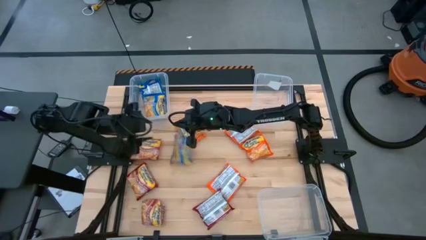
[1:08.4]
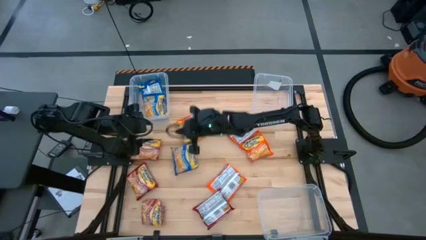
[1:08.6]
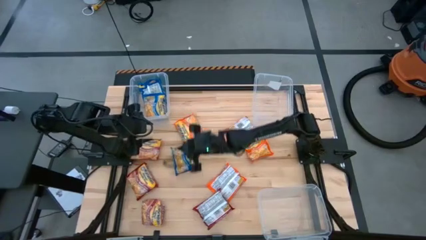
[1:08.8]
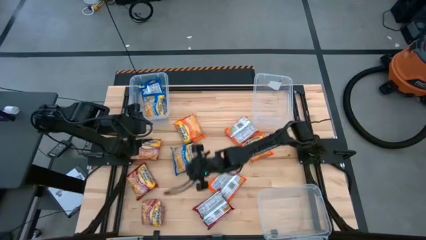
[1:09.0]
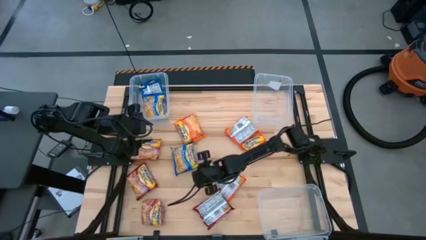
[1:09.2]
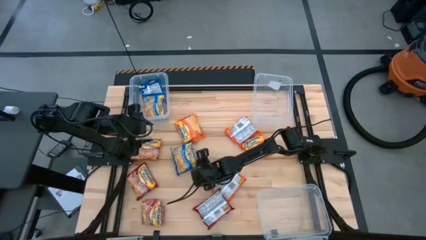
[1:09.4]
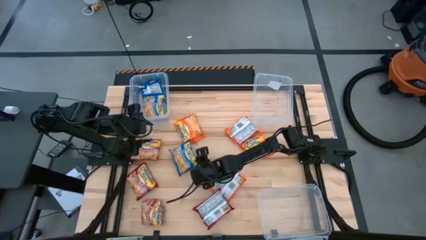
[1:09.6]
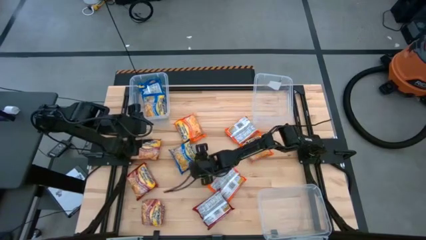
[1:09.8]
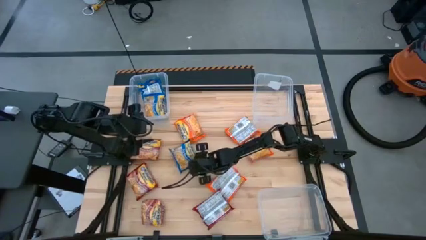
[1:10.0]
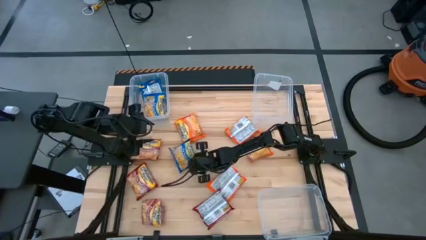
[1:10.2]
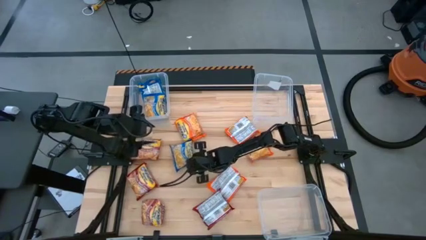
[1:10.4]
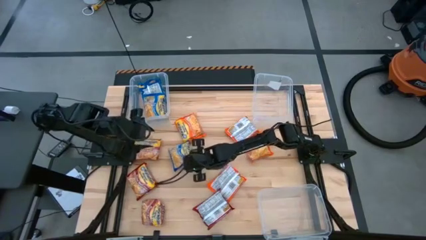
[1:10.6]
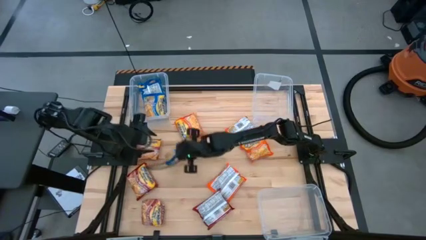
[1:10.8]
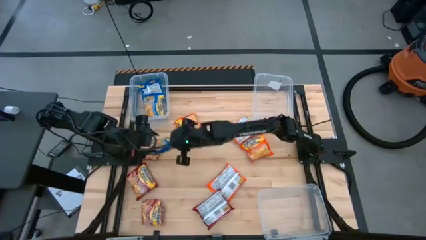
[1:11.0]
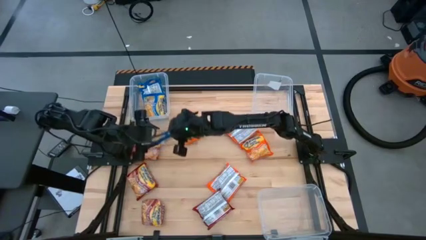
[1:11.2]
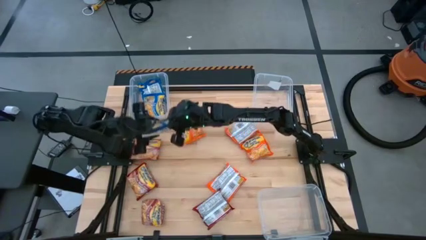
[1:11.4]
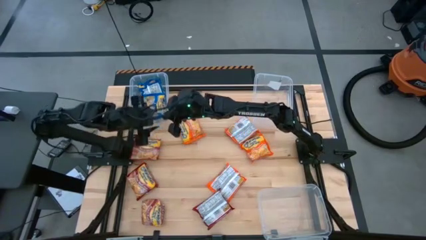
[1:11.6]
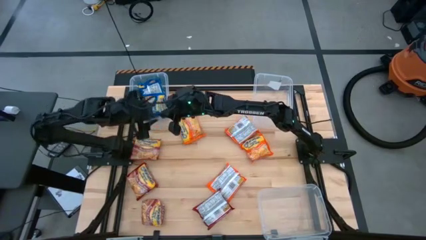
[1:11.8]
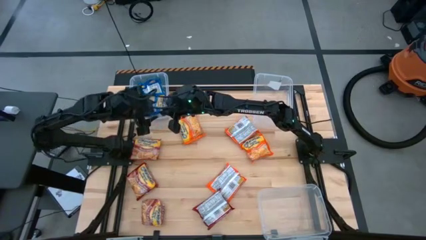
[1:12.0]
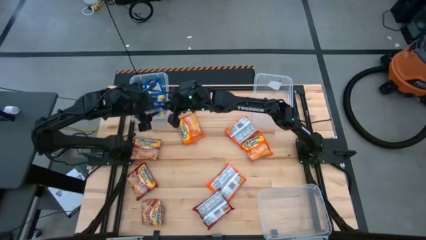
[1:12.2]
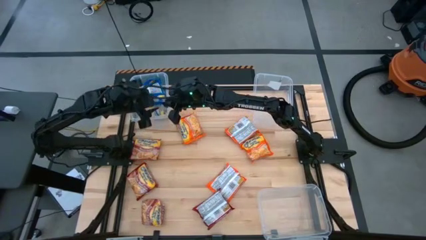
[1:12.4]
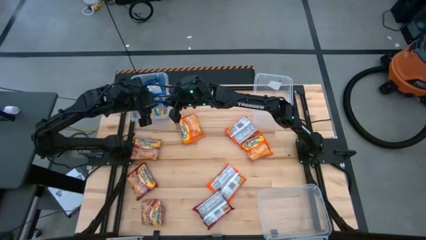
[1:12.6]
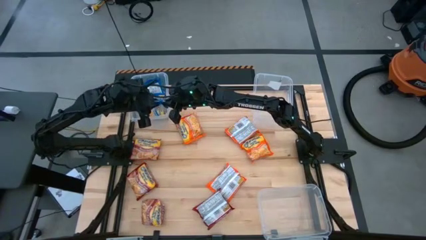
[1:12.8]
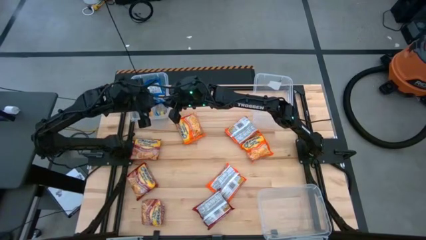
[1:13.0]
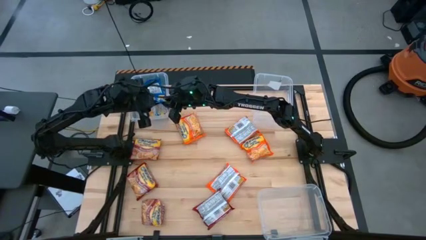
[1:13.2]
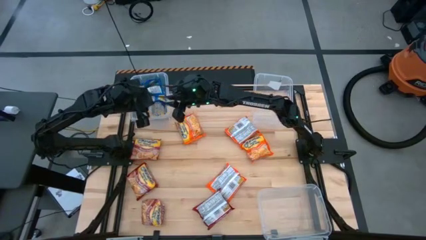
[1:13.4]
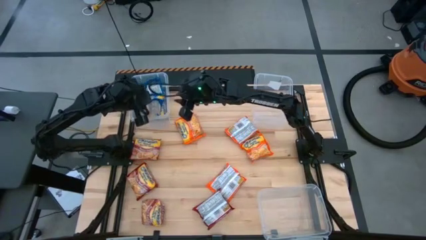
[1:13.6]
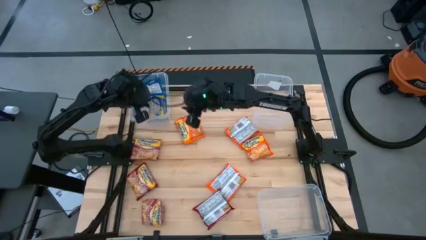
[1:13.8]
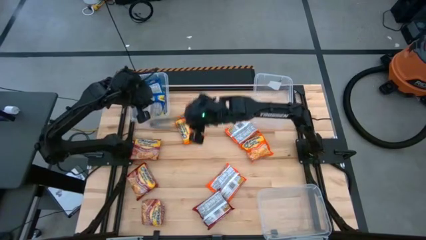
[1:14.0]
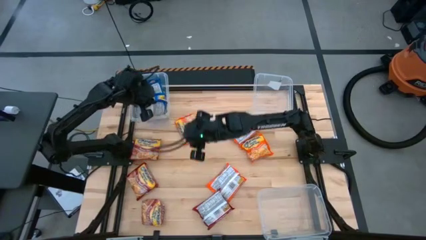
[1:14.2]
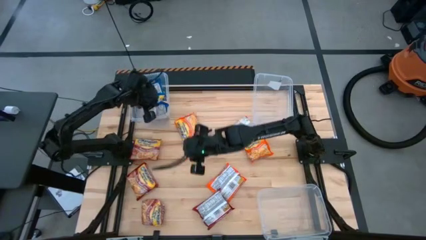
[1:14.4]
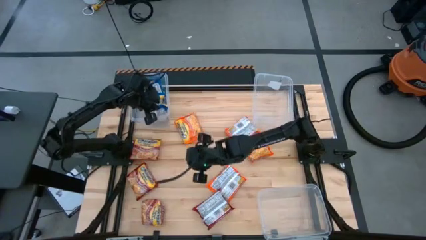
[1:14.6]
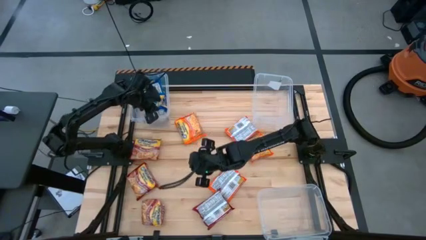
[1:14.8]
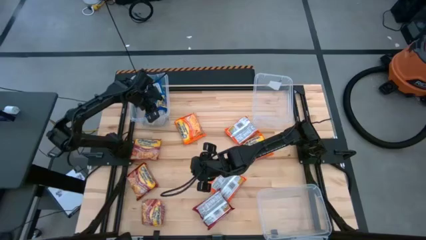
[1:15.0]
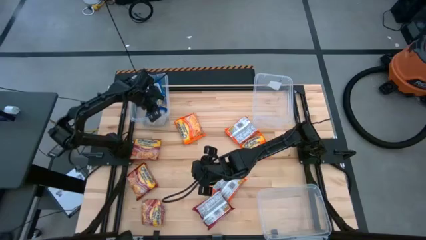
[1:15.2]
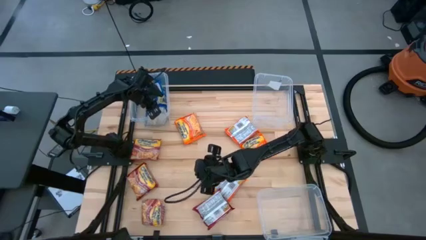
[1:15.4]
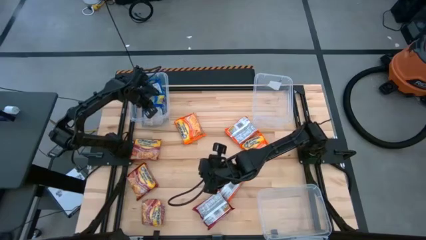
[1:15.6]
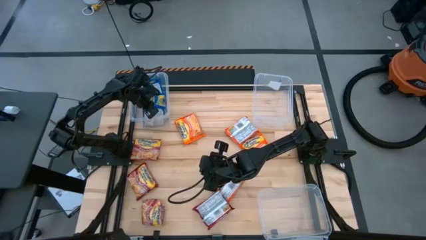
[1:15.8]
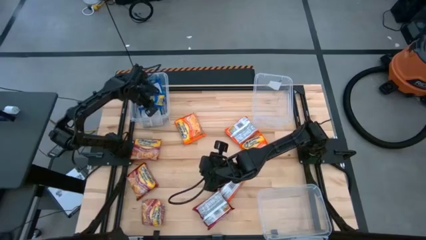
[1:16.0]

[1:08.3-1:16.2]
Task: Sort Maruchan noodles
Put the blue noodle pack into the top left transparent bin

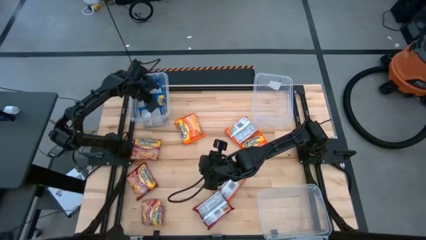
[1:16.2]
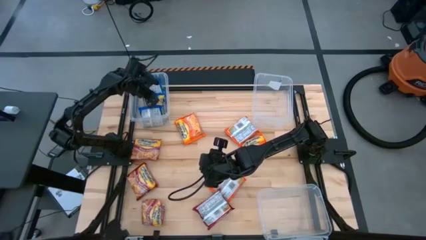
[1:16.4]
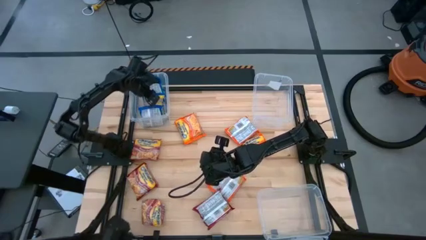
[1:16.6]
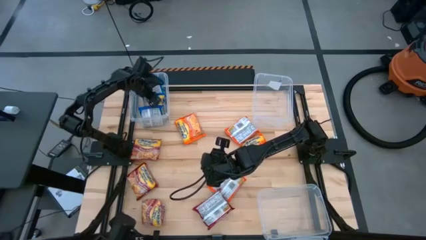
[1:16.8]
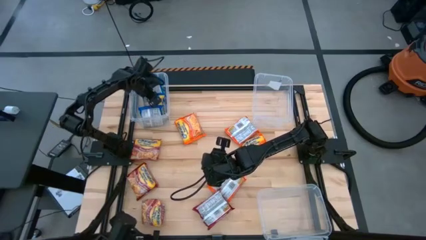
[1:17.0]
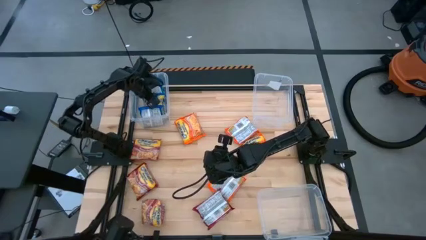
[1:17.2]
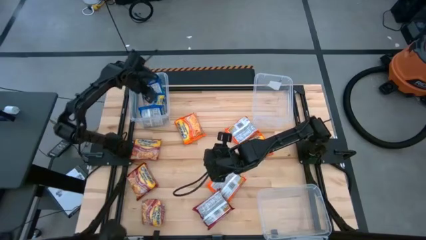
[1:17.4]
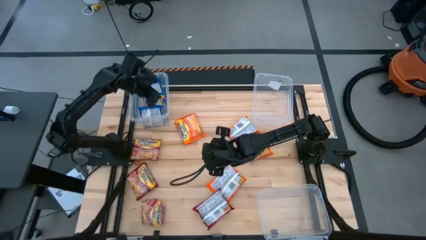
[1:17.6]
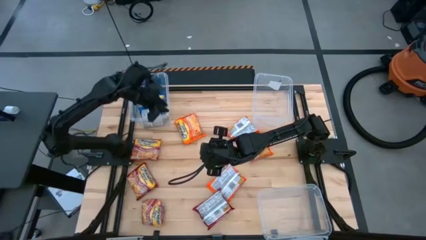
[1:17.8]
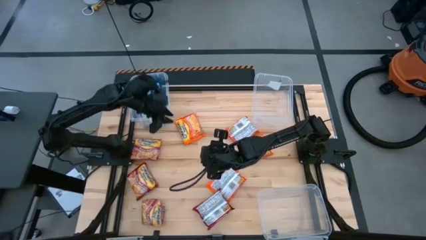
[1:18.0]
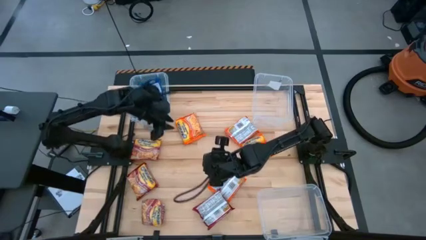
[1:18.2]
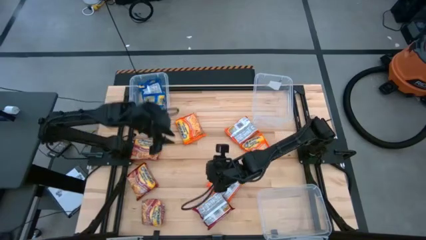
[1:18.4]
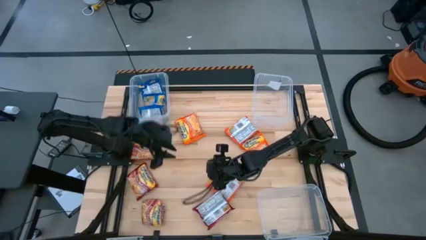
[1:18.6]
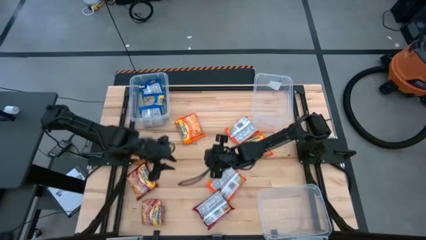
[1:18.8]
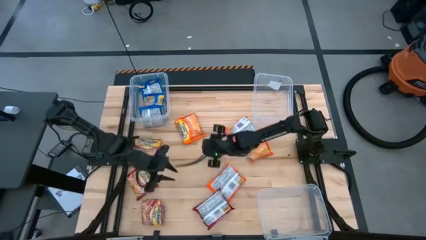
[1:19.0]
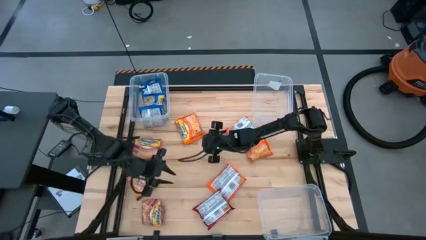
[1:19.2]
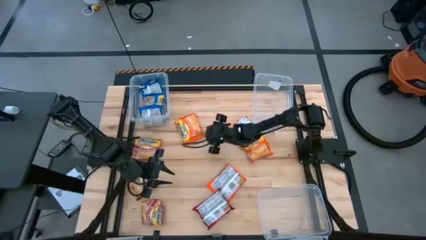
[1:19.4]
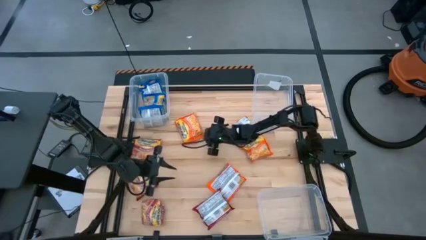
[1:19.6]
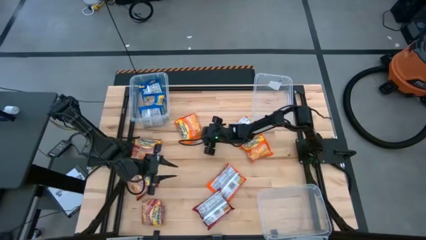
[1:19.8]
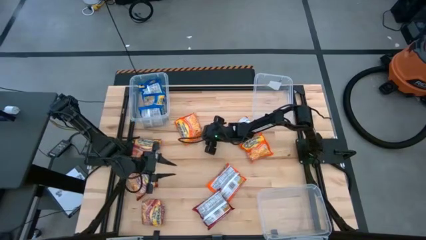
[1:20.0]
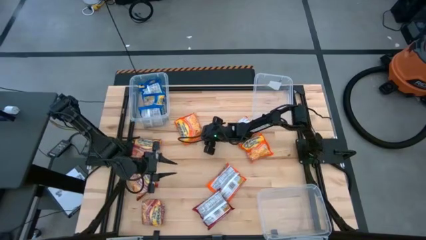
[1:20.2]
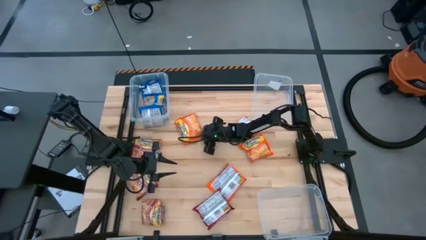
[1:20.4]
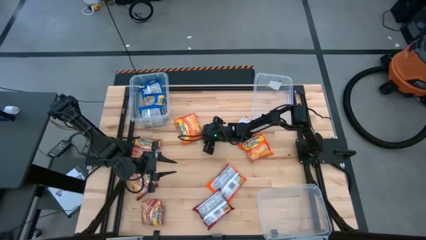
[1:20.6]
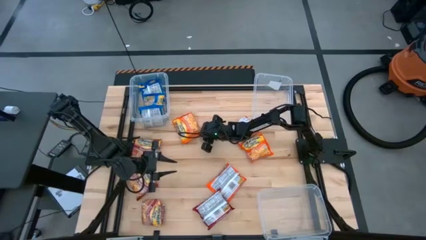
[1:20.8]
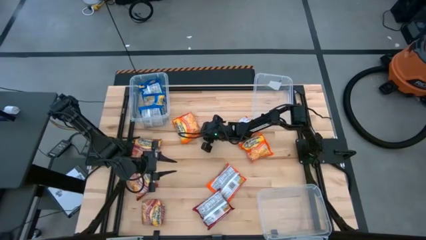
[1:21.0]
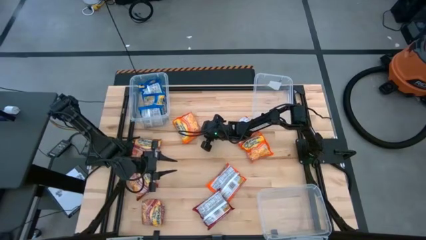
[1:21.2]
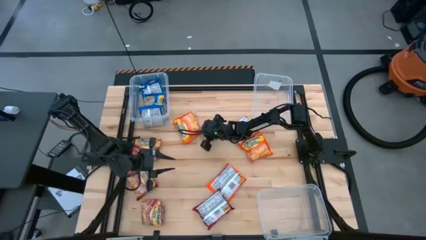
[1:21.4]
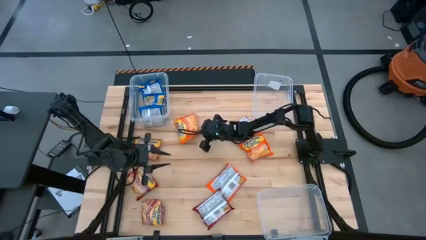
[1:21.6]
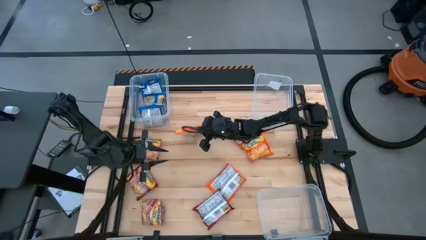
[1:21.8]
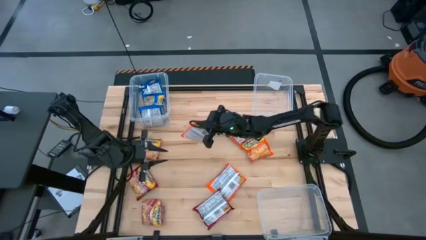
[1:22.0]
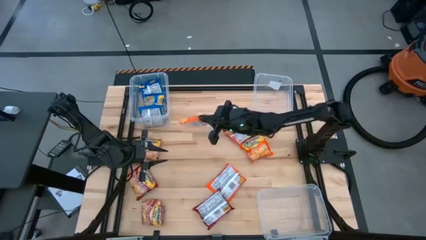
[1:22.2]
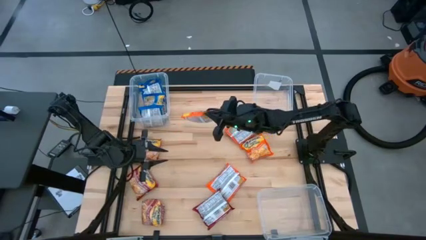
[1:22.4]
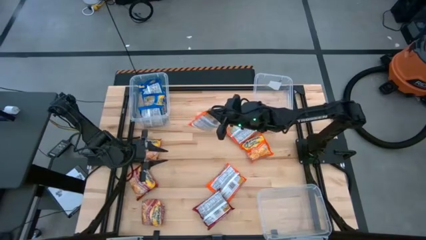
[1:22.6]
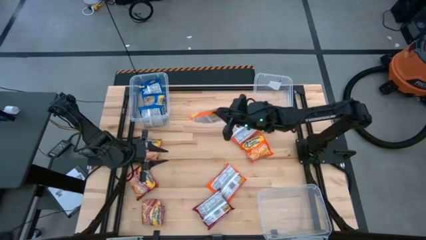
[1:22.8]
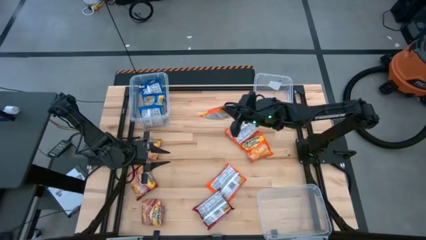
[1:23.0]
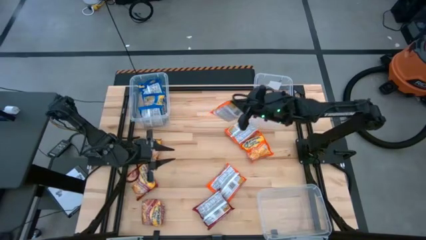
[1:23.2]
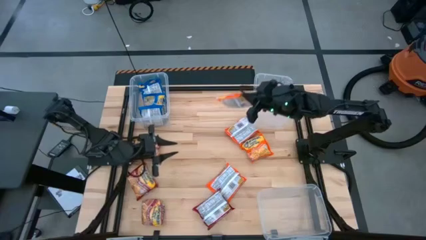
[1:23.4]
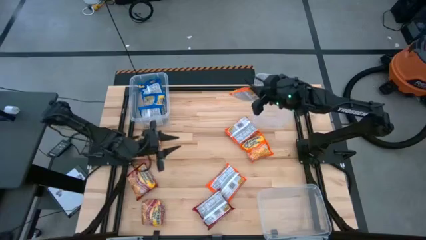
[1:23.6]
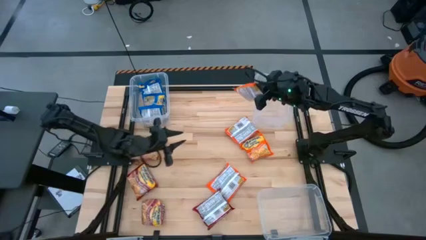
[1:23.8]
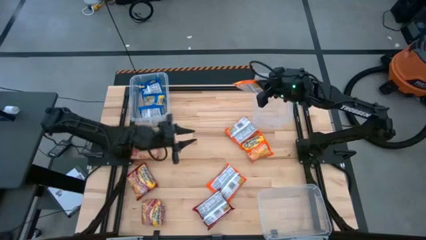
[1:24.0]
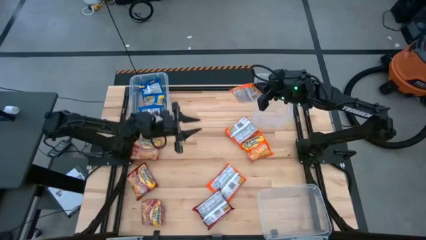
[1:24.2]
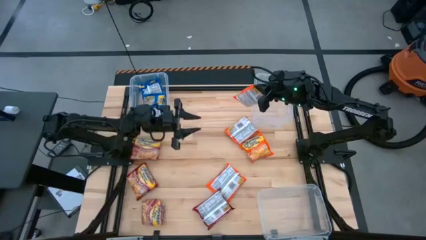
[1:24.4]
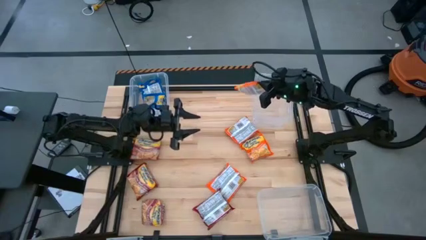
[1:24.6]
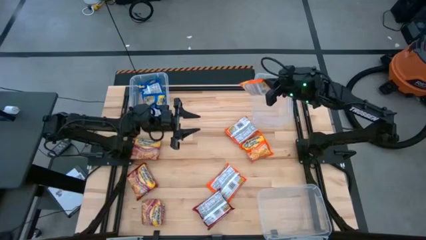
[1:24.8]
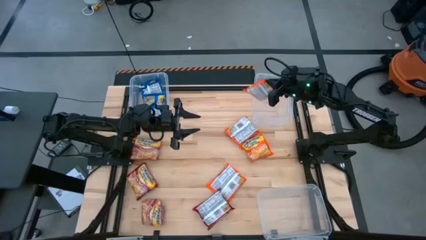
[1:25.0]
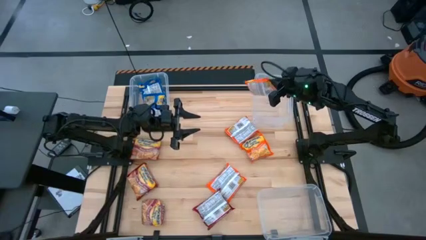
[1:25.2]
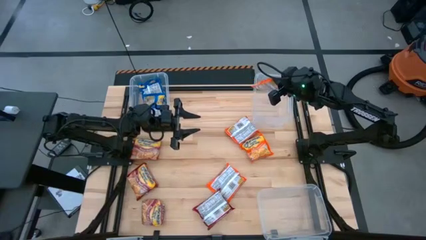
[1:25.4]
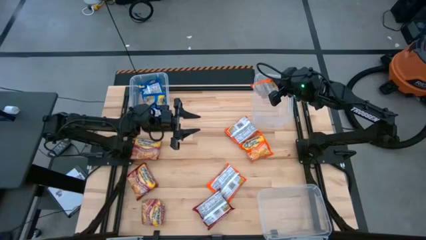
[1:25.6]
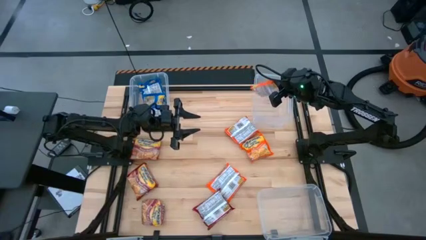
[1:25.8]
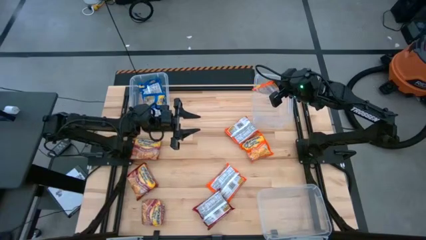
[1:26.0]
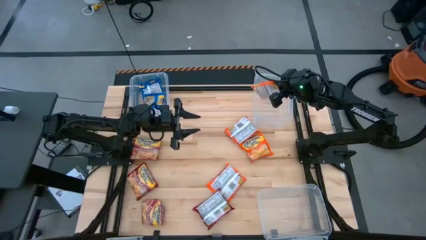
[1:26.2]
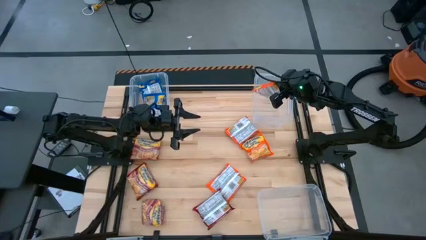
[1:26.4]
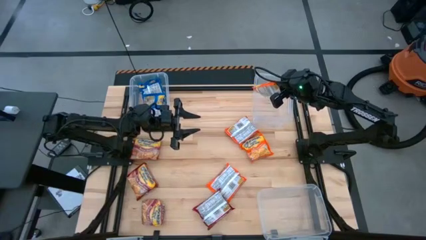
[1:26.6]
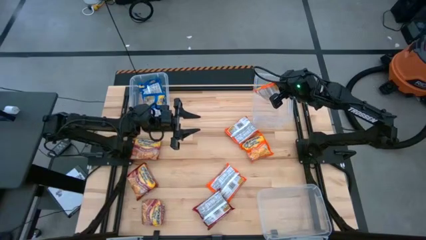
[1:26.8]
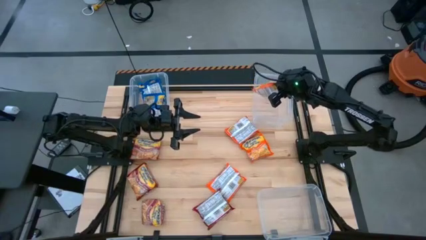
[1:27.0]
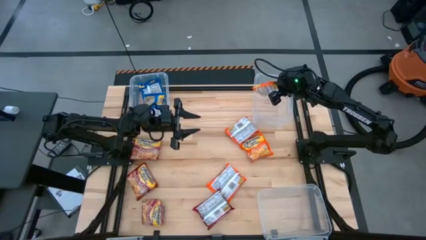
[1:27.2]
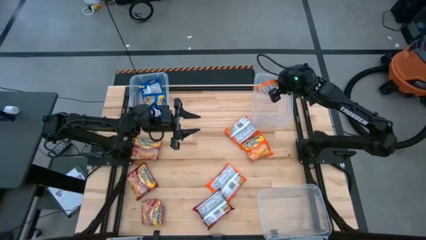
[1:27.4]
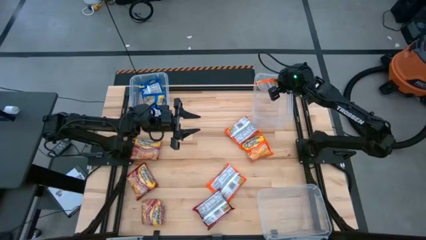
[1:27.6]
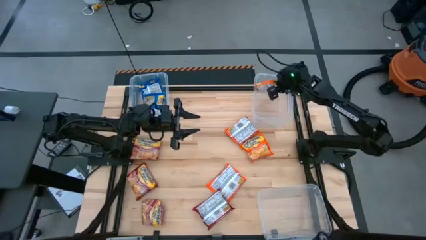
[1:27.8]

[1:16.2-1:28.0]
Put the orange noodle pack into the top right transparent bin
